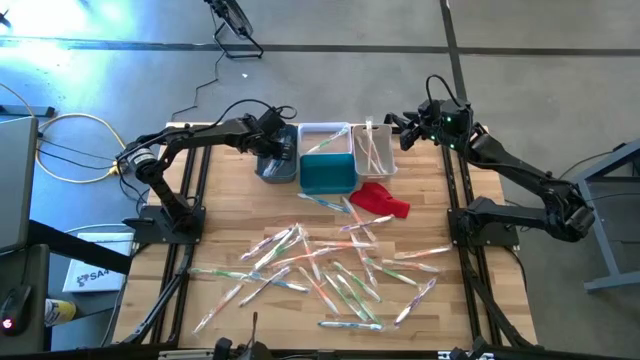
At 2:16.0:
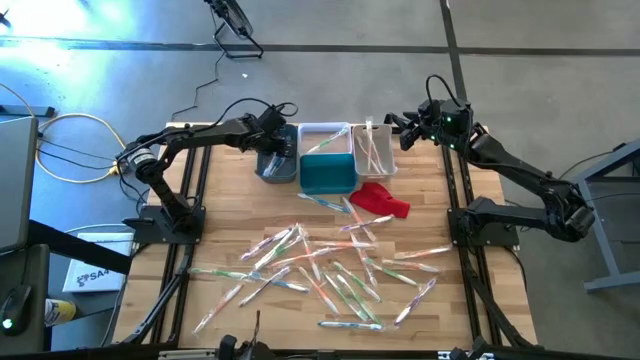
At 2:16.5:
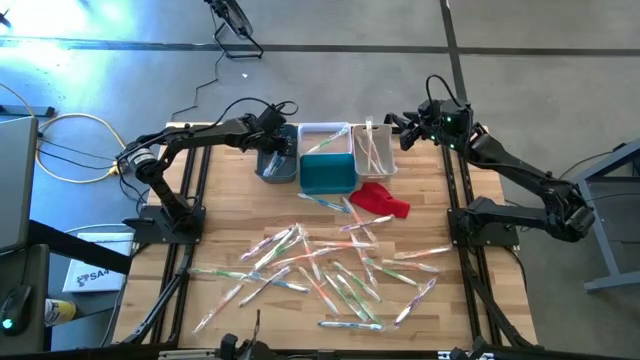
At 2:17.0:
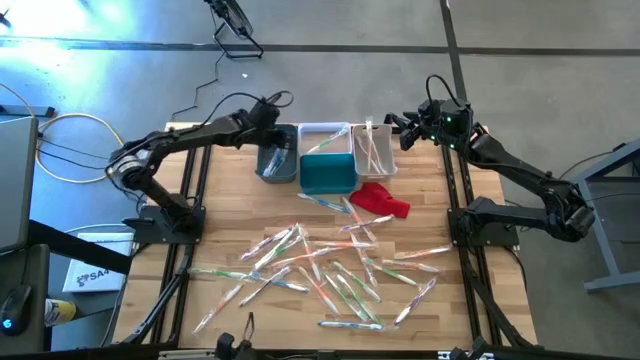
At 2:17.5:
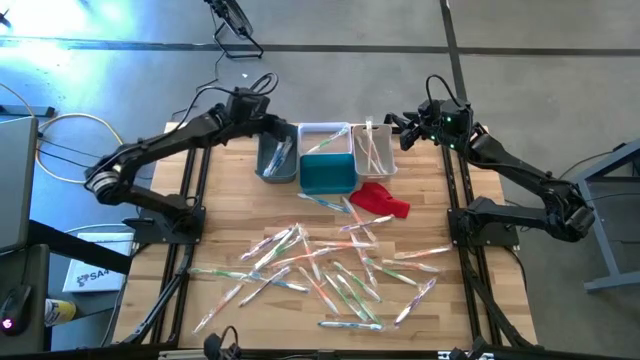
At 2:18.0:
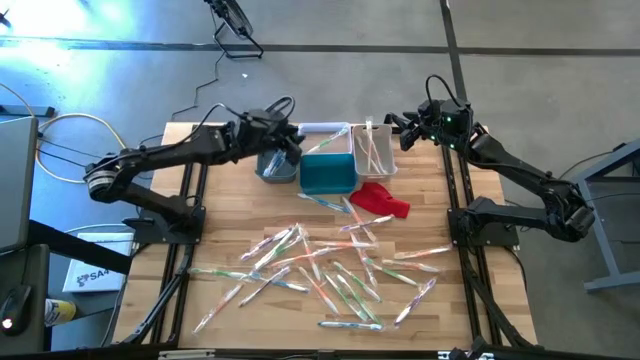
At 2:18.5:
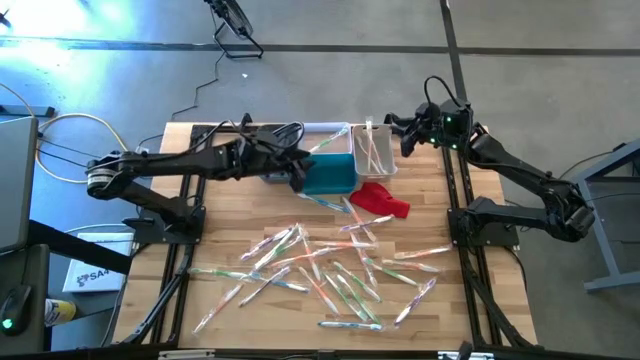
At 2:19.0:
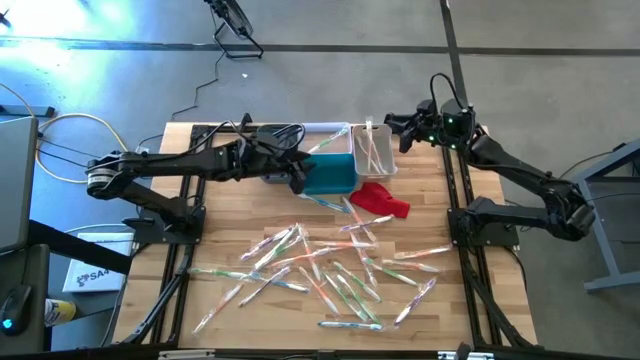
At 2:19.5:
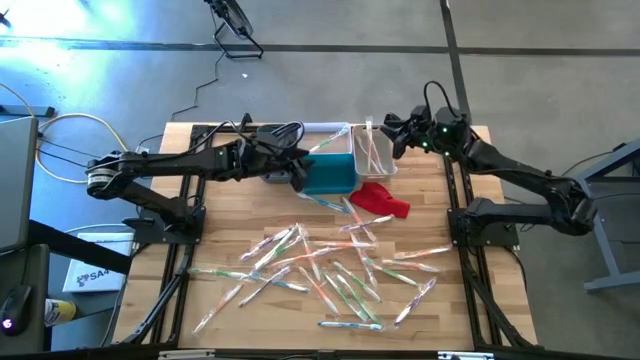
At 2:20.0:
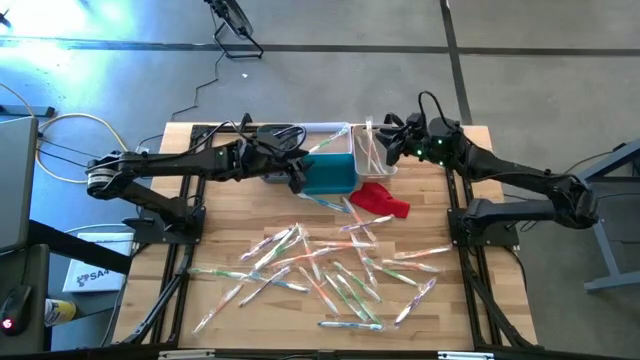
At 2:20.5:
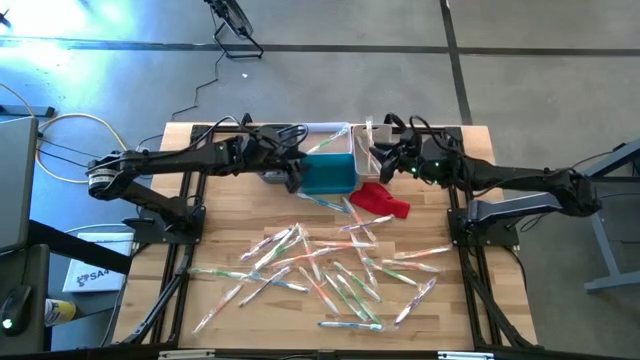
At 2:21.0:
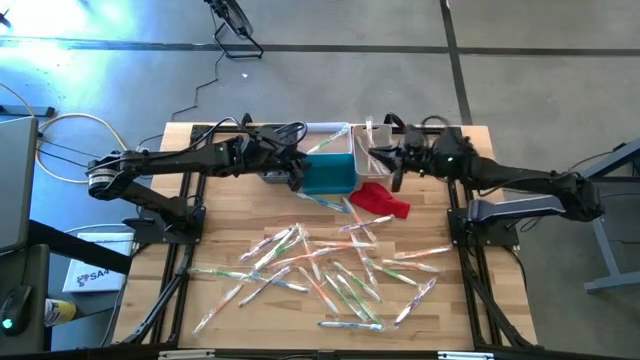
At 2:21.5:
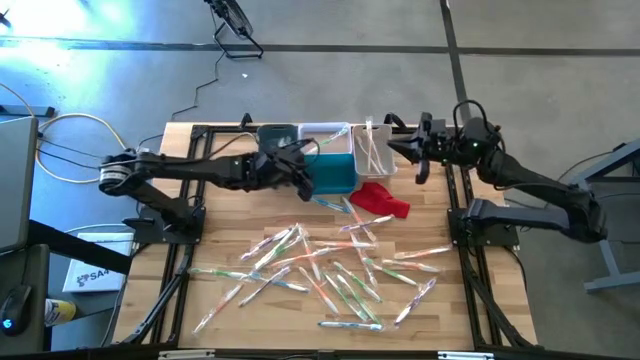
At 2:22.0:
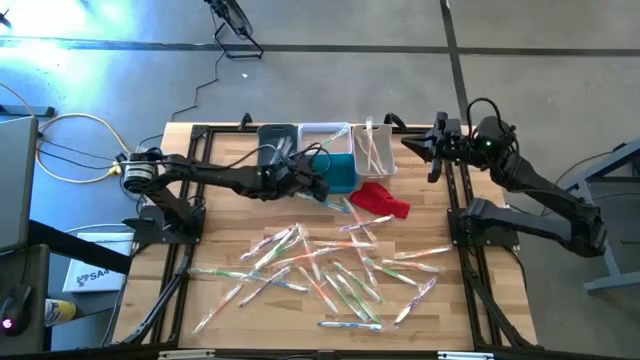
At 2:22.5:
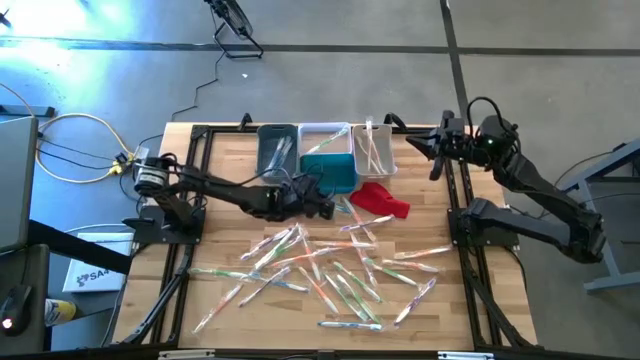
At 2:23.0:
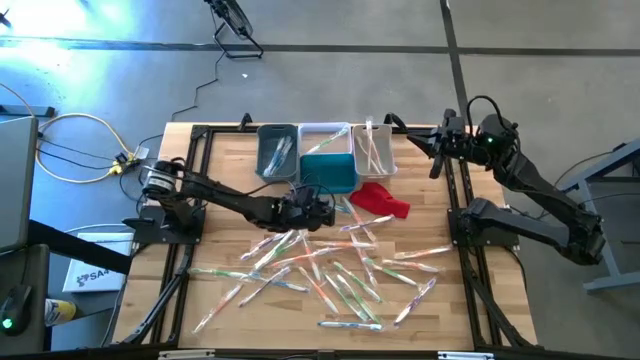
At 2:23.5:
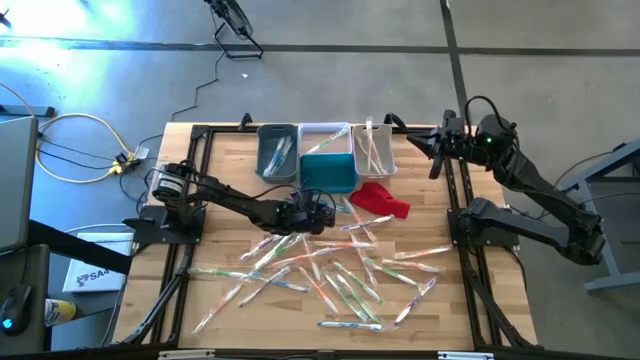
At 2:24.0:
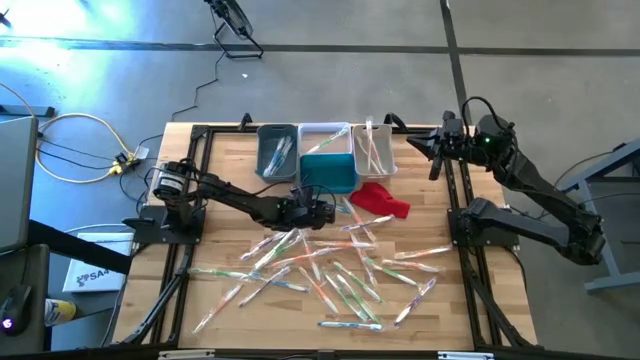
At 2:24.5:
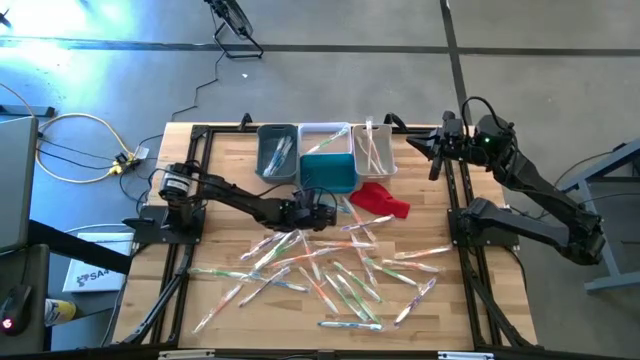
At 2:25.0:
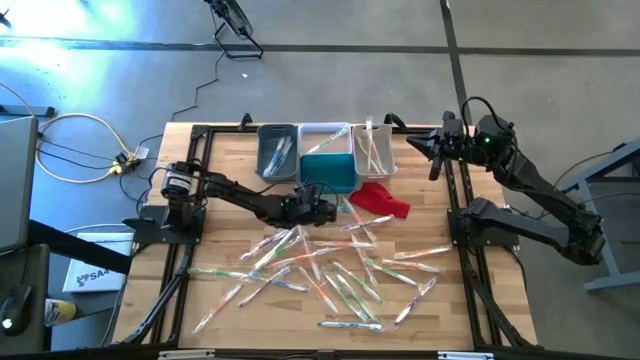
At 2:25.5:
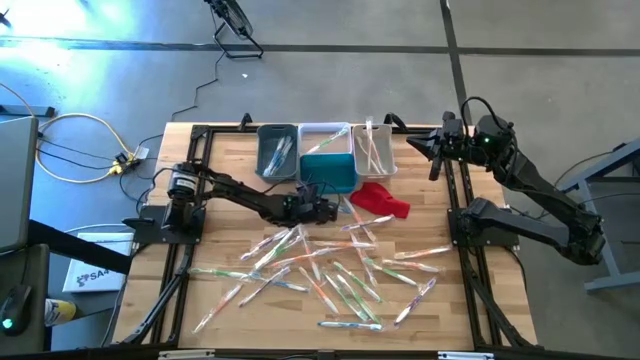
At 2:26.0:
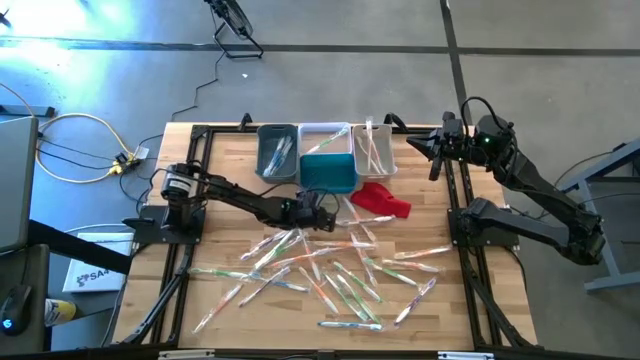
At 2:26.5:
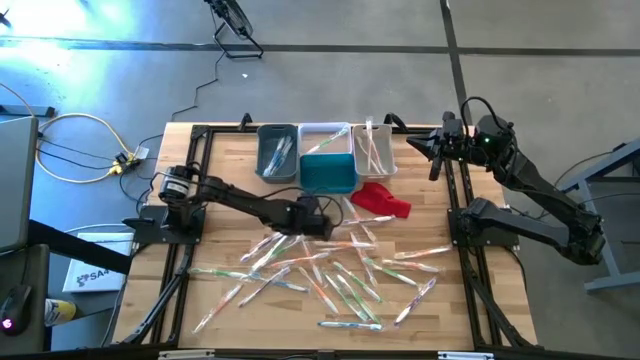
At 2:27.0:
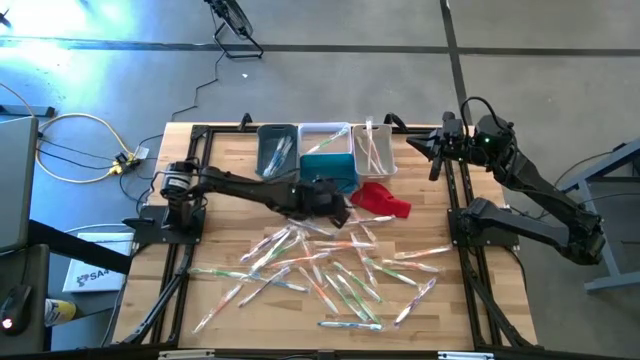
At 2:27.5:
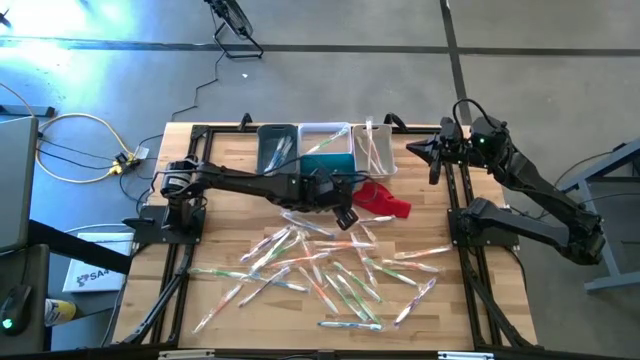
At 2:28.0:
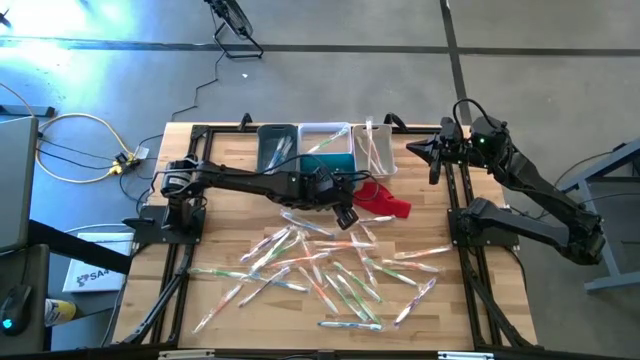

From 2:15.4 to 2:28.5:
Task: Pick & Place Toothbrushes
Put the top blue toothbrush into the gray bin

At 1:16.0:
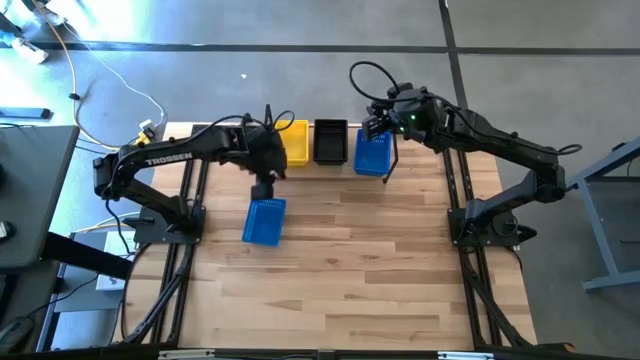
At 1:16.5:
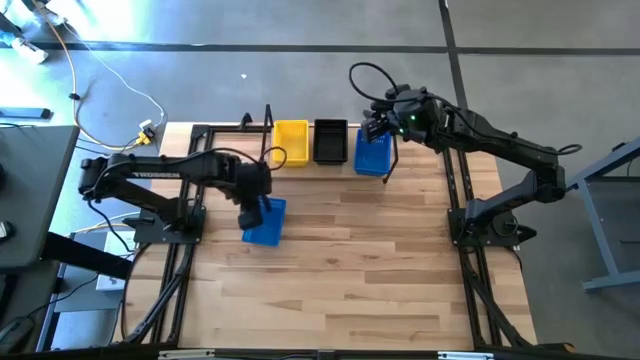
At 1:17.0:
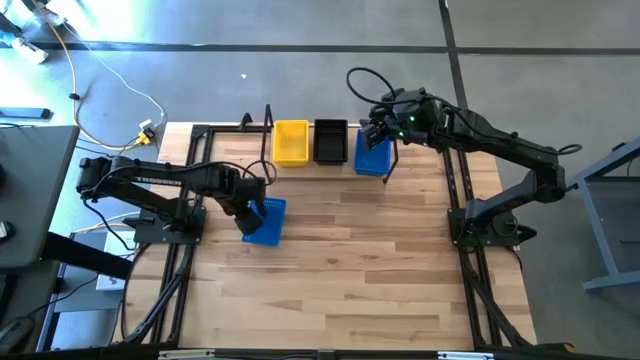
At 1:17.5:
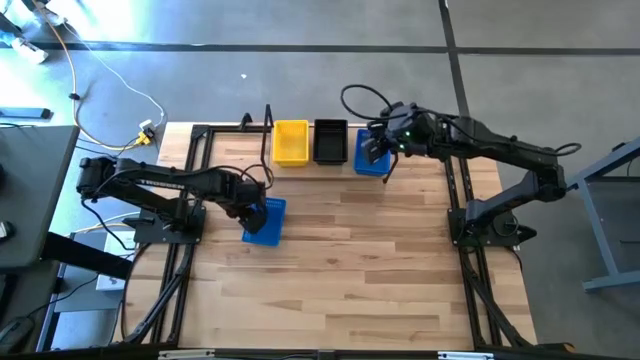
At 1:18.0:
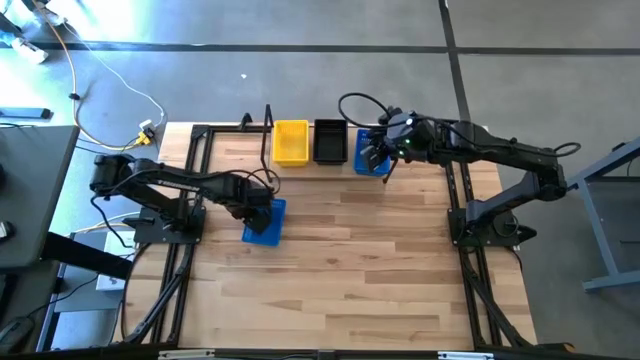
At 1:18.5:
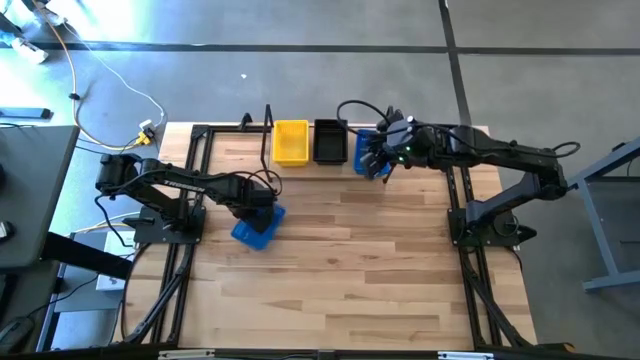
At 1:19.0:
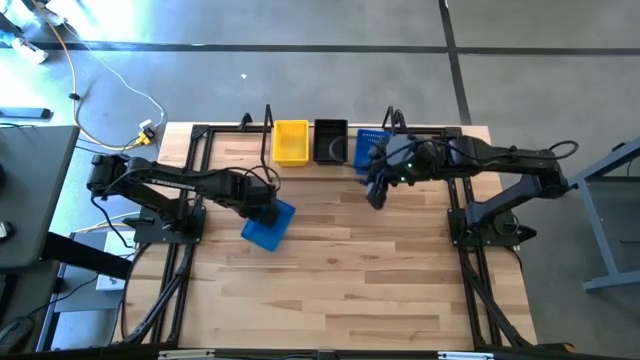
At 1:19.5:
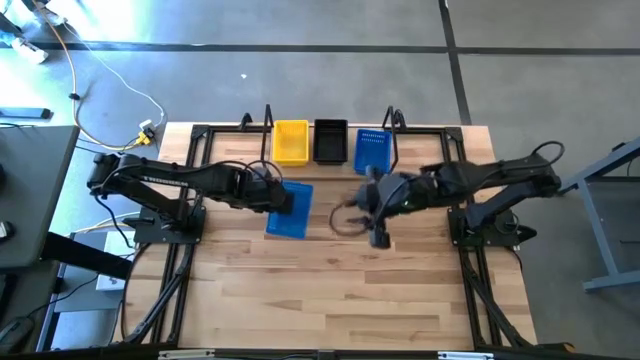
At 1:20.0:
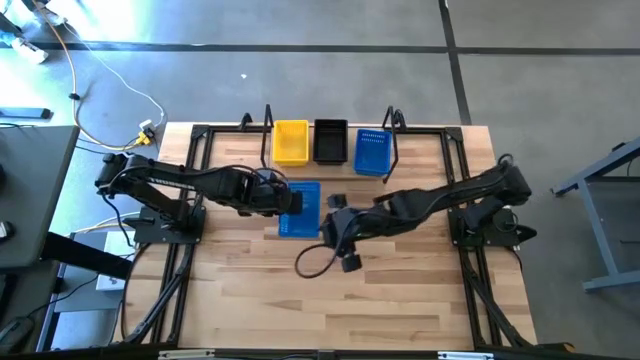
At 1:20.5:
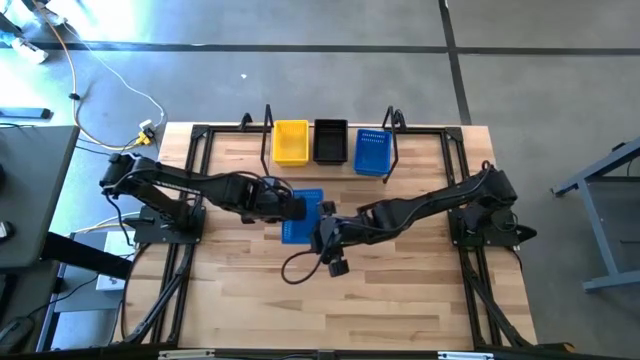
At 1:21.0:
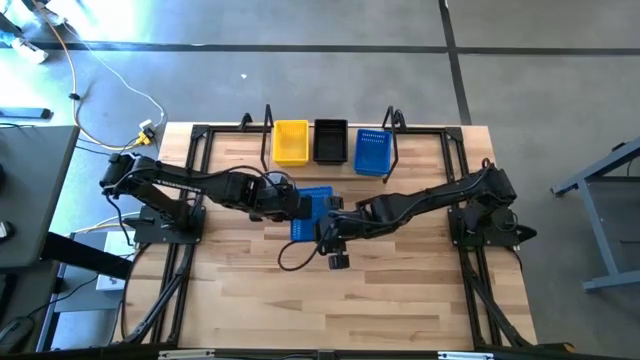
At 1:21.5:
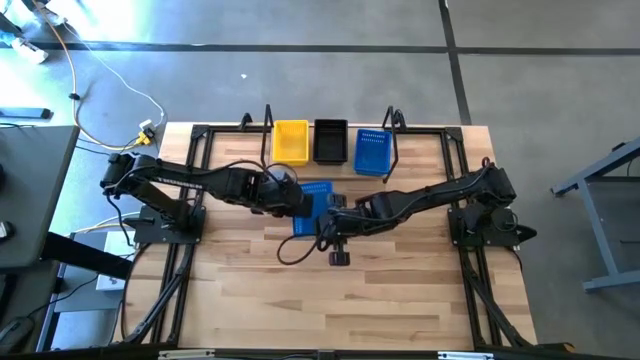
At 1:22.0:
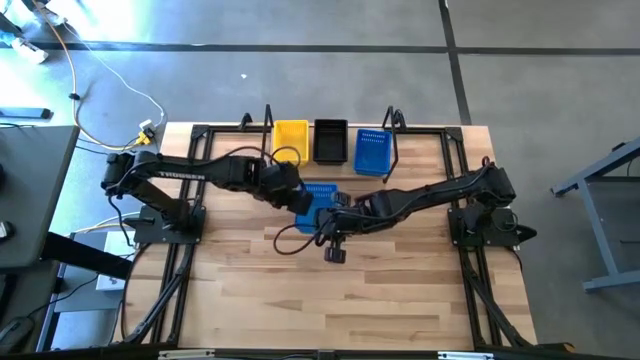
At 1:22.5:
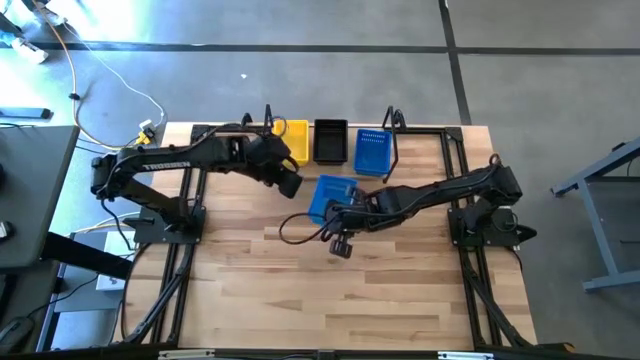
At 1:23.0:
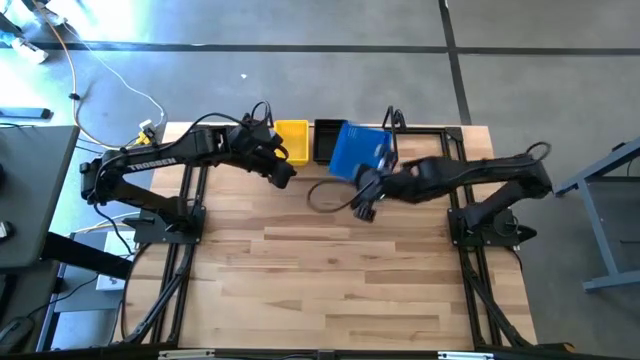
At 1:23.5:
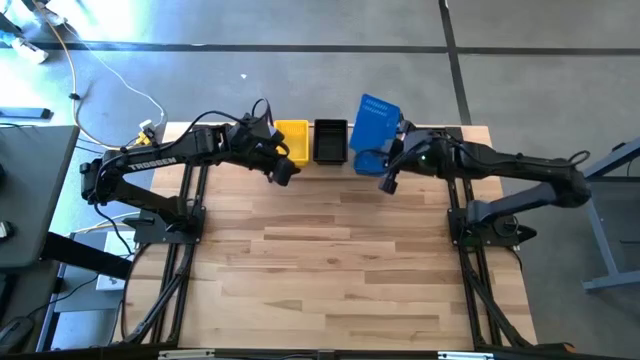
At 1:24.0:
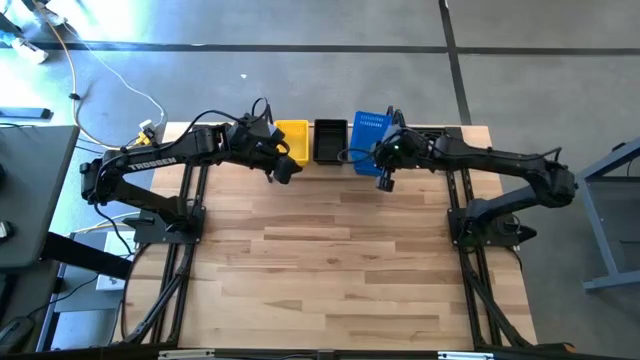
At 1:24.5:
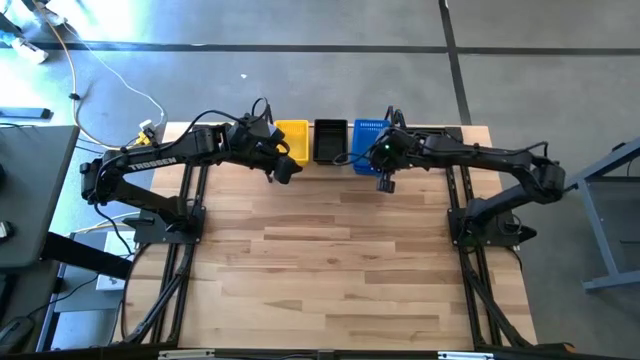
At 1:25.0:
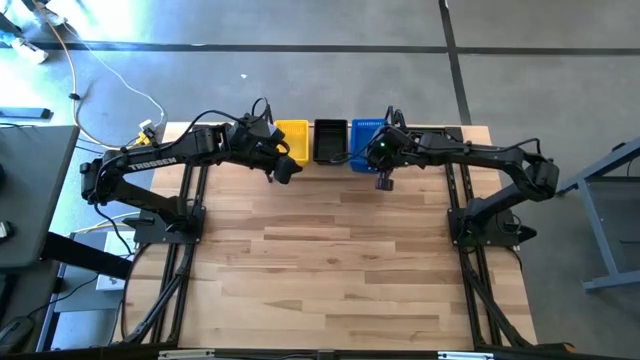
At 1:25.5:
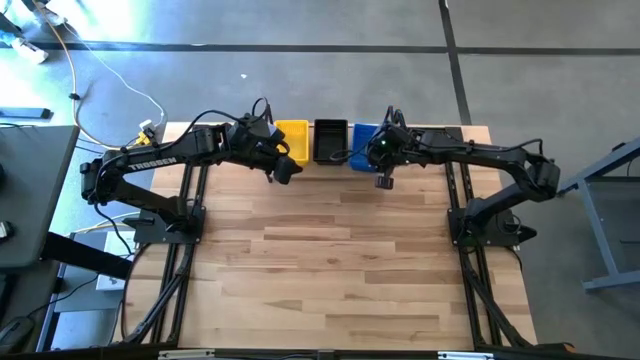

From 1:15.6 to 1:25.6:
Task: Stack baskets on shelf by color
Stack the blue bin on top of the other blue stacked bins on the shelf
